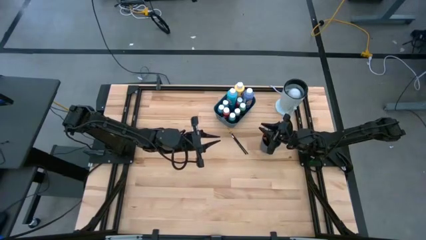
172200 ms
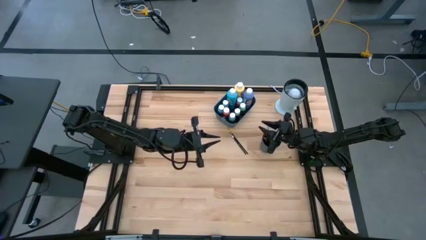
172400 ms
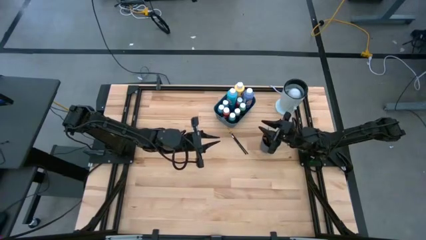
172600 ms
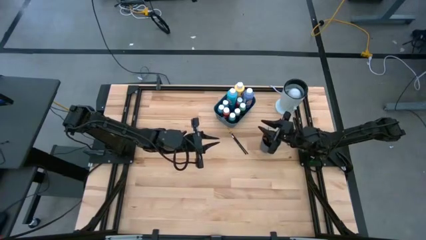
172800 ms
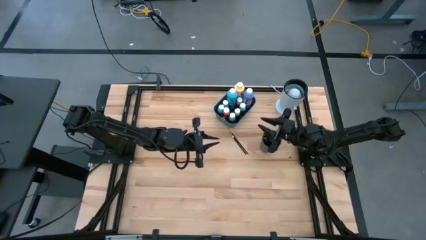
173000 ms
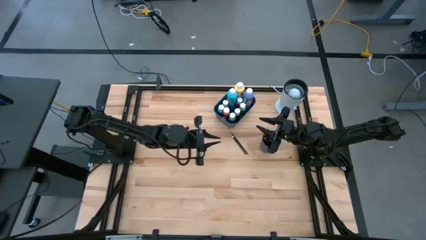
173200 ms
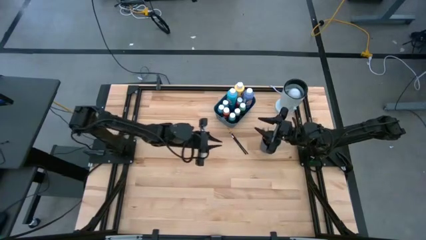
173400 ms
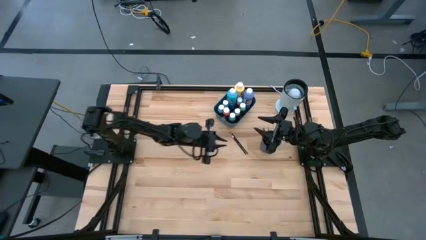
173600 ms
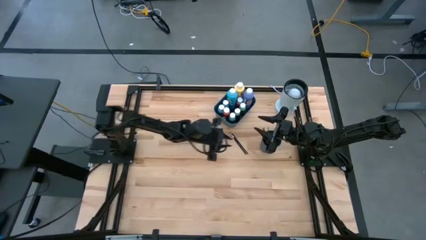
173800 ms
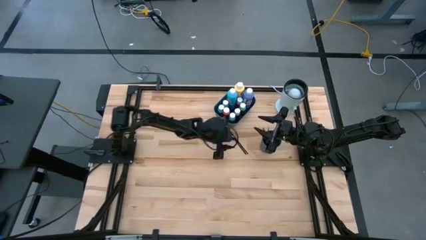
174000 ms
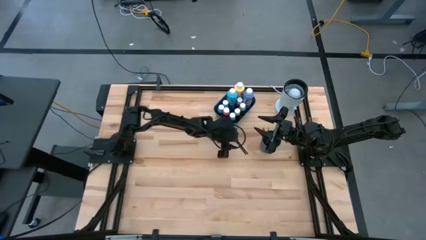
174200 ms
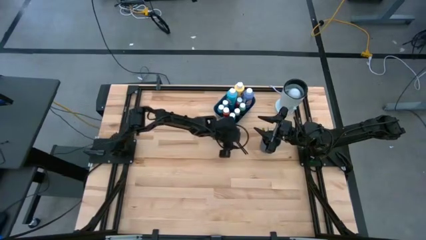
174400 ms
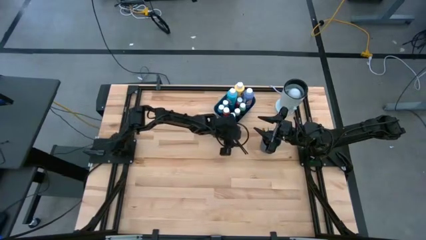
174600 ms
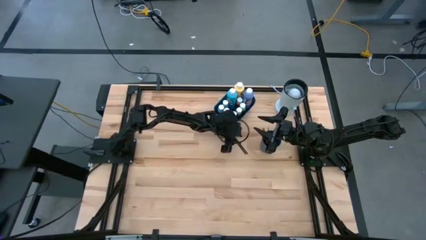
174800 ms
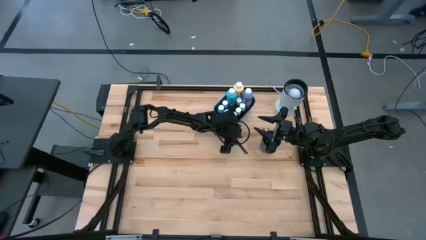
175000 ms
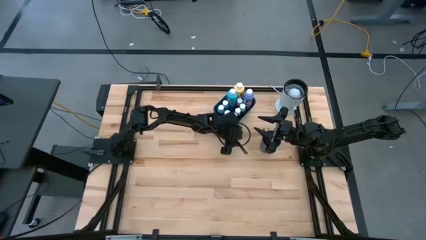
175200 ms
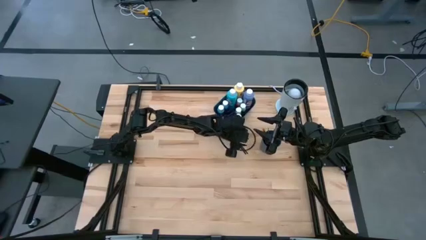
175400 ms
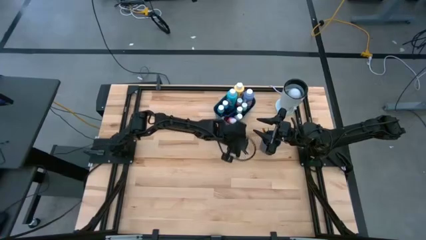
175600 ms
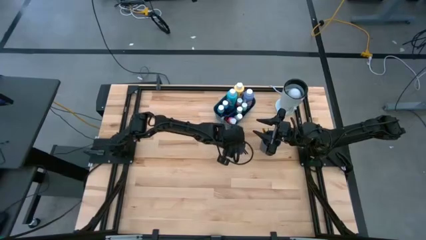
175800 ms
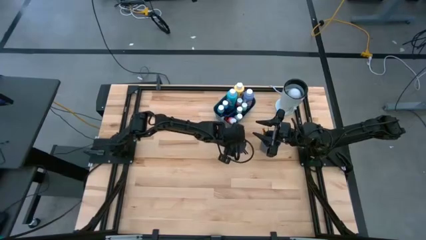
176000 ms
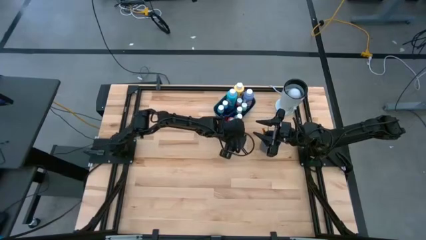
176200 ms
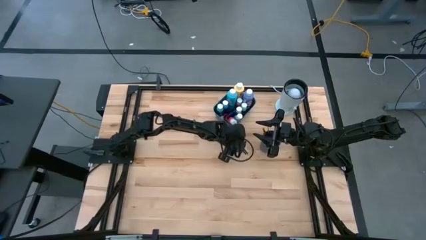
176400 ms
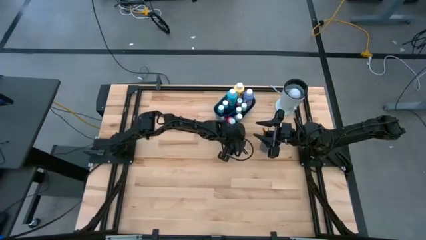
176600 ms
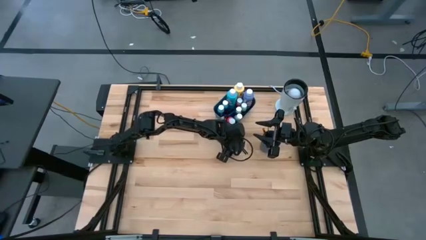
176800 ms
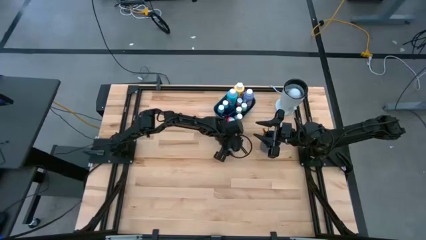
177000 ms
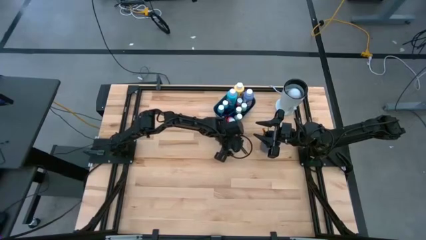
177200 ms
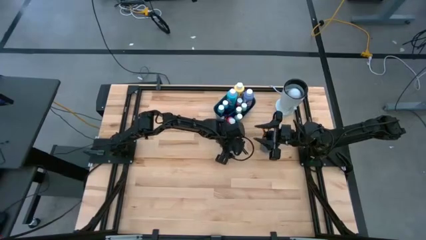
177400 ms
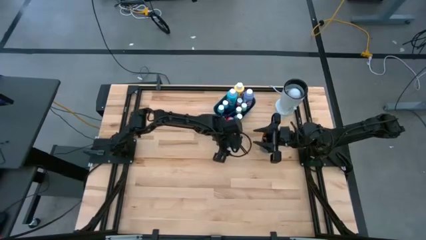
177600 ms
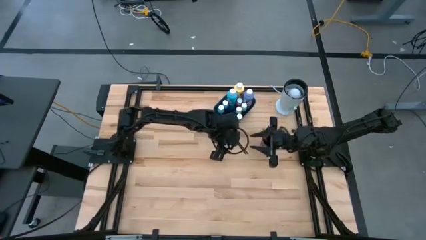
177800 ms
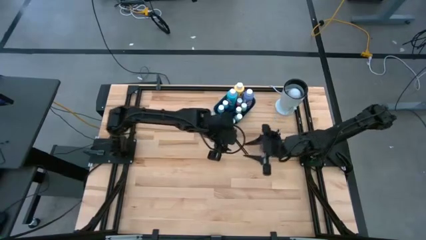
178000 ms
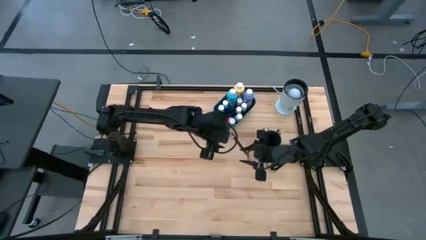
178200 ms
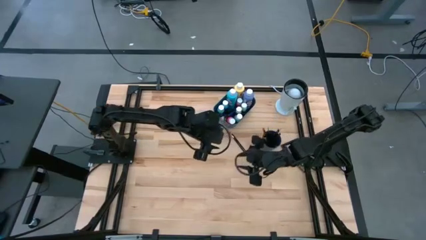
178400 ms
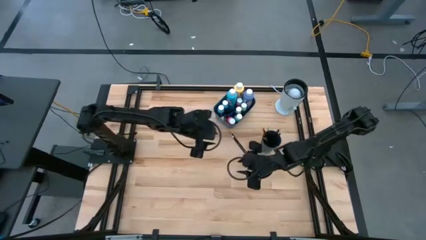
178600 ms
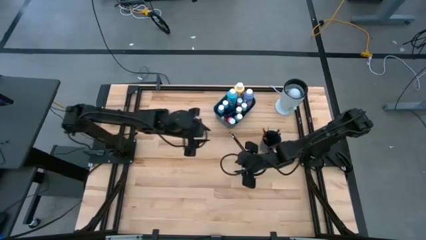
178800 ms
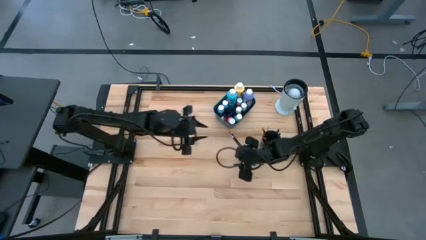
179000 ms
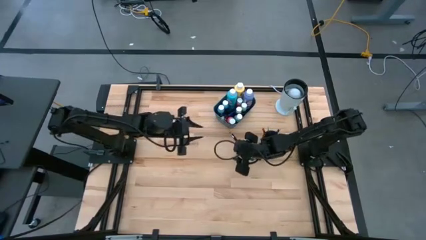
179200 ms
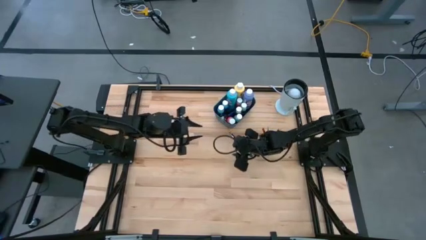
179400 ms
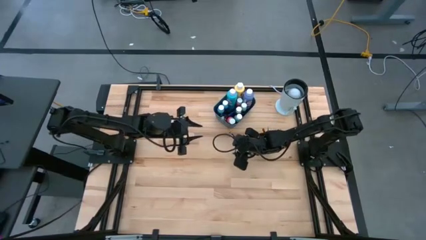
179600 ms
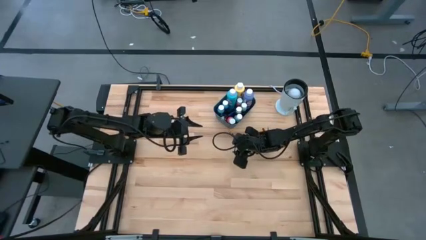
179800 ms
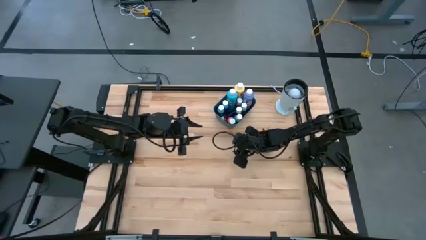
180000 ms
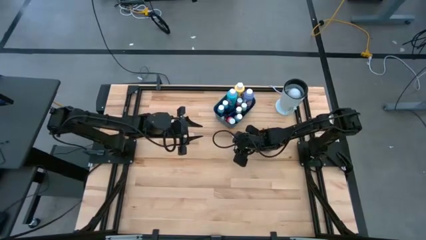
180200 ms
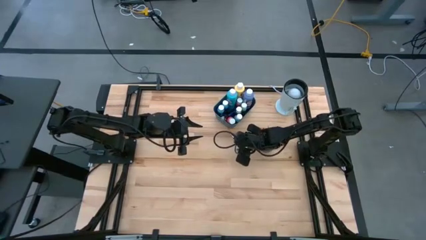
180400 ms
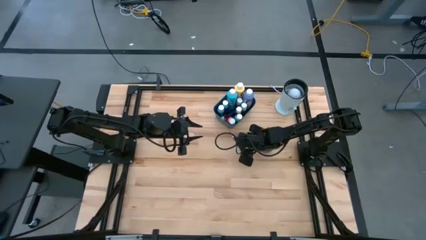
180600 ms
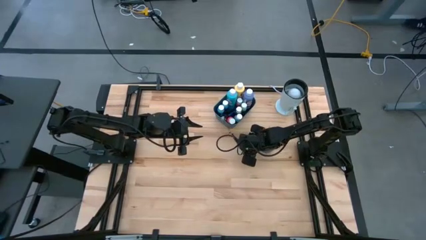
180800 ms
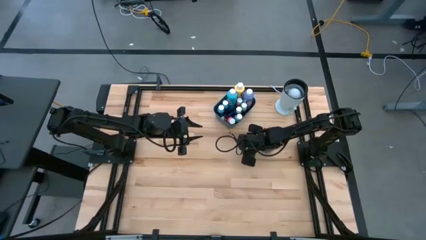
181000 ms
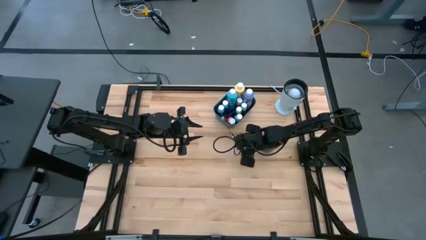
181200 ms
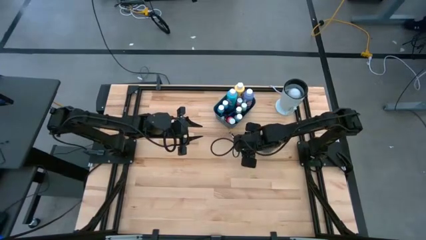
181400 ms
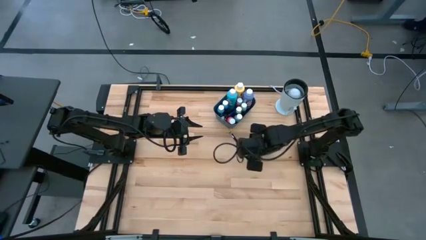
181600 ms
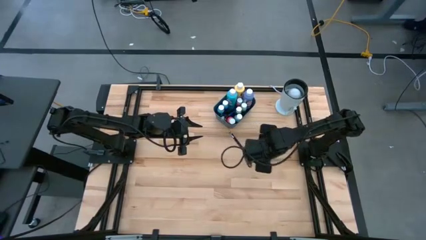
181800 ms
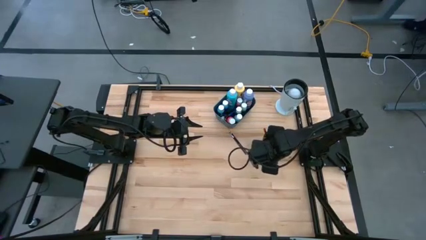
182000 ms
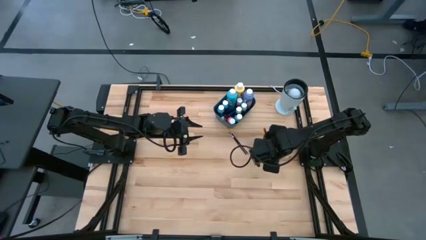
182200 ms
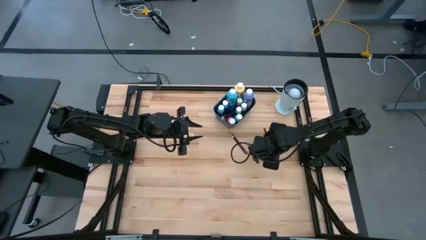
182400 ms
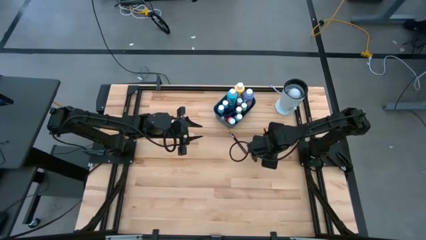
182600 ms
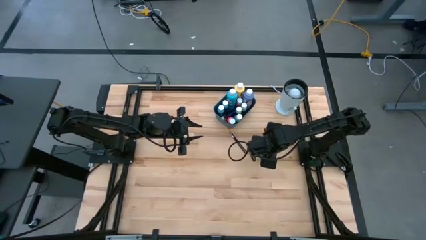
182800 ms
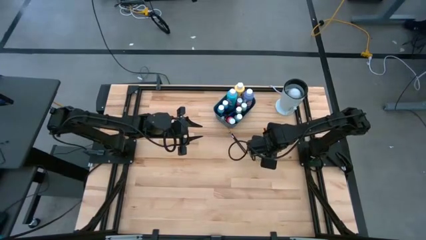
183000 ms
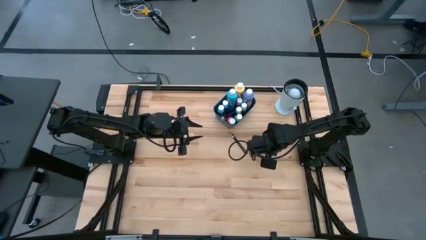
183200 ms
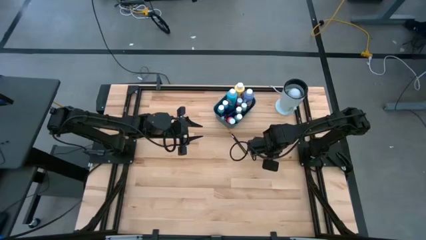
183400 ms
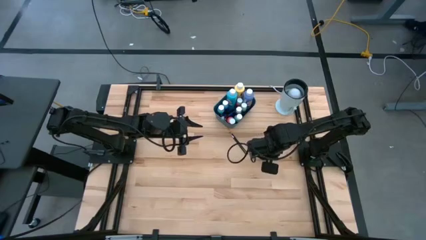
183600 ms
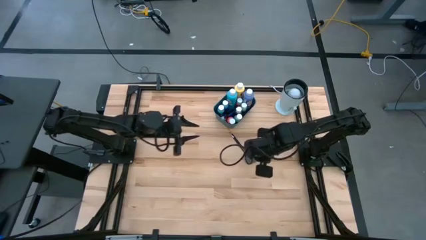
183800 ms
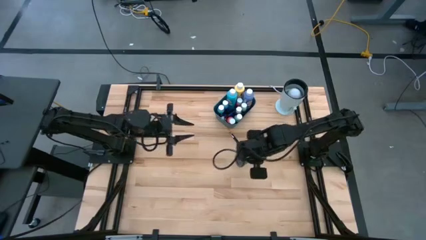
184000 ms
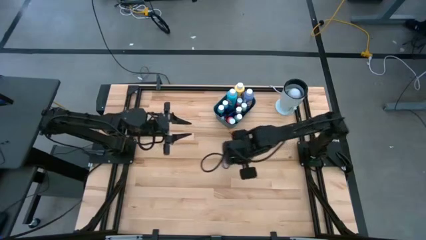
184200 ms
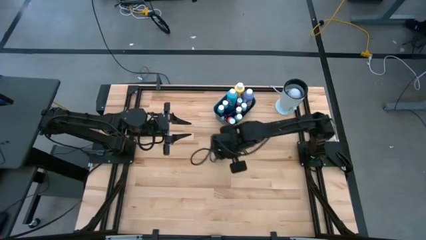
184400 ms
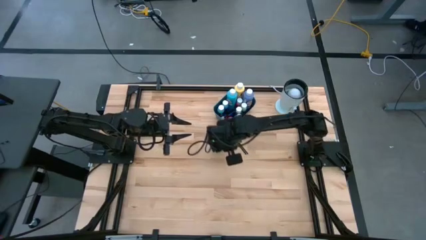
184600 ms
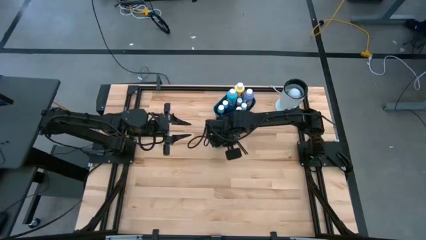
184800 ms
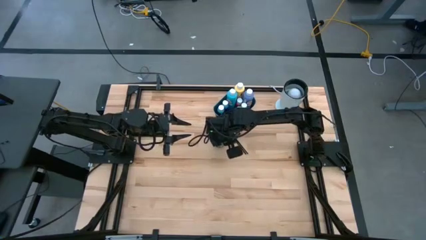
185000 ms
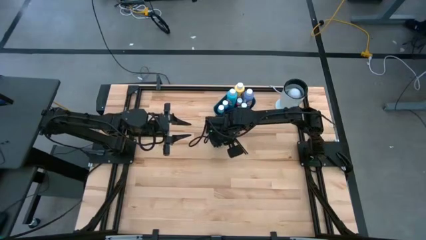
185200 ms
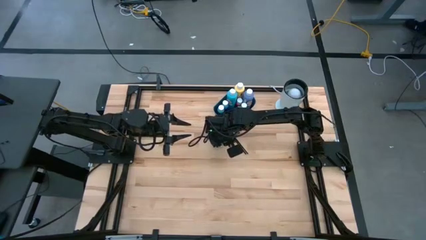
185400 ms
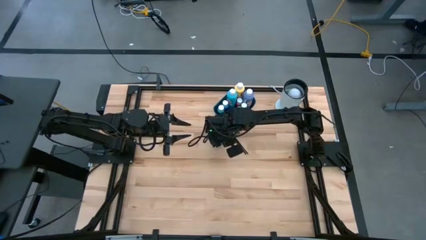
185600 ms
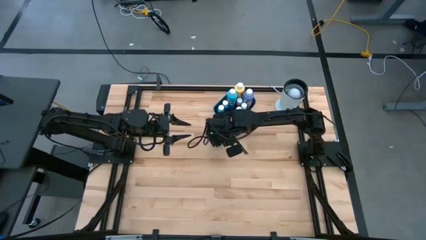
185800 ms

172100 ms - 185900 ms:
Task: Pick & Place Paint Supplies
Move the blue cup to the center of the table

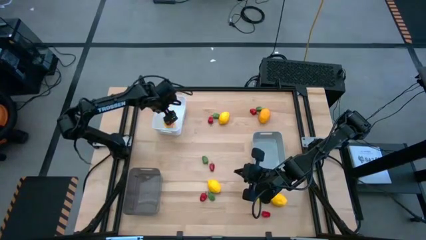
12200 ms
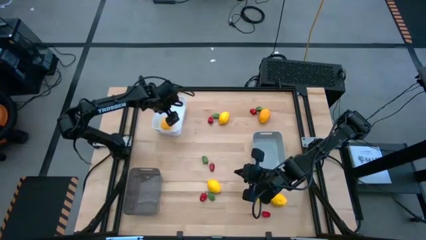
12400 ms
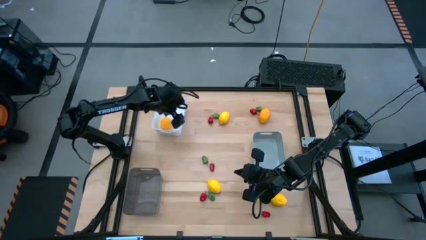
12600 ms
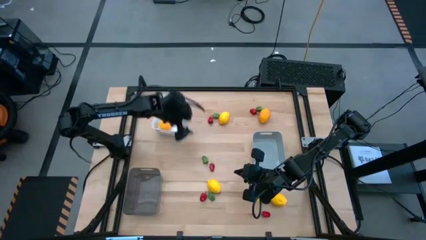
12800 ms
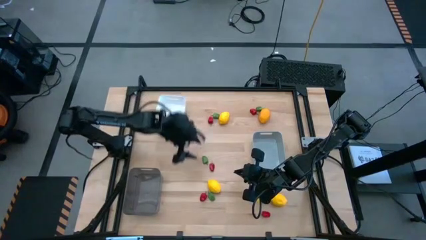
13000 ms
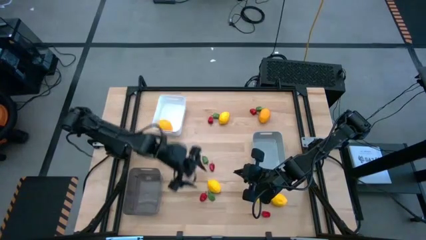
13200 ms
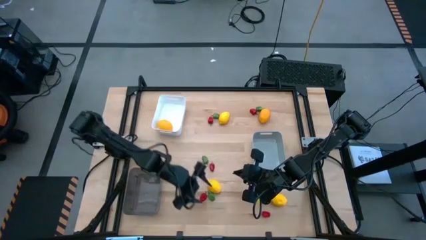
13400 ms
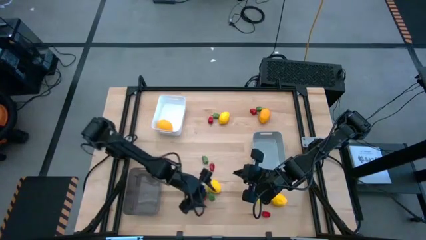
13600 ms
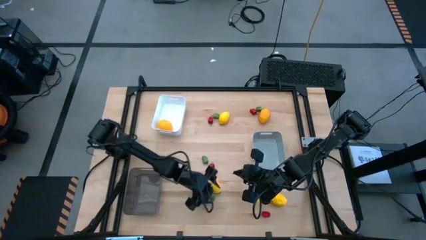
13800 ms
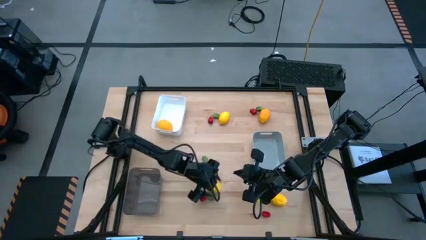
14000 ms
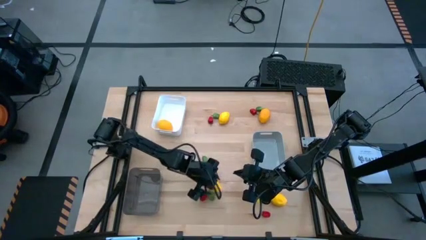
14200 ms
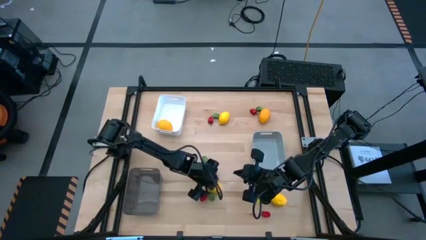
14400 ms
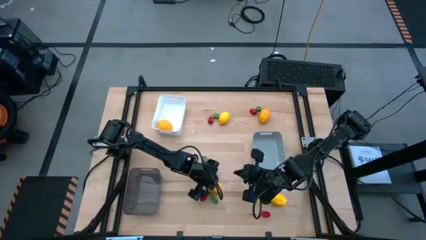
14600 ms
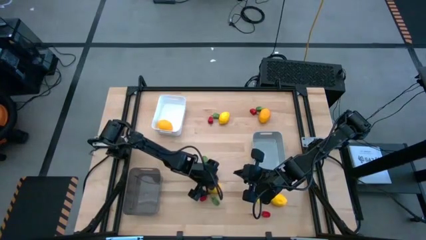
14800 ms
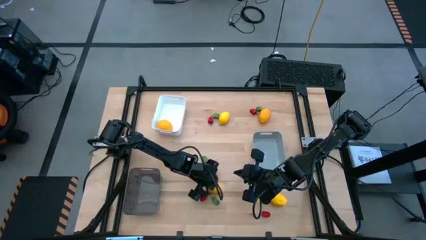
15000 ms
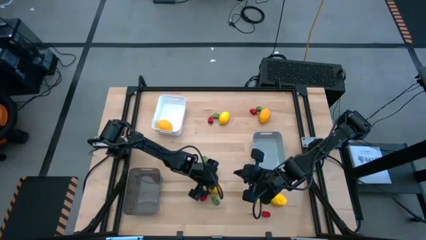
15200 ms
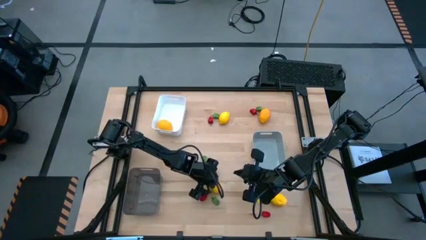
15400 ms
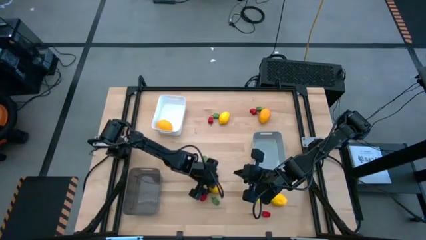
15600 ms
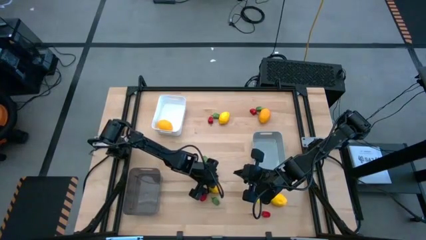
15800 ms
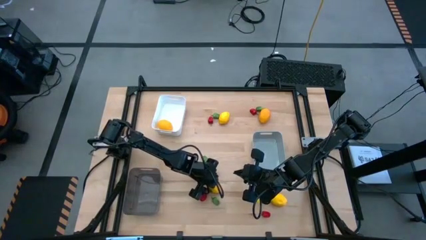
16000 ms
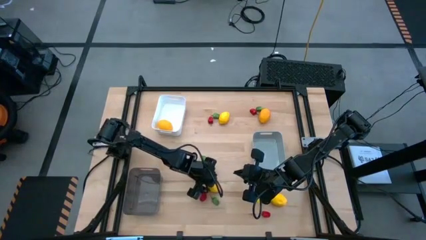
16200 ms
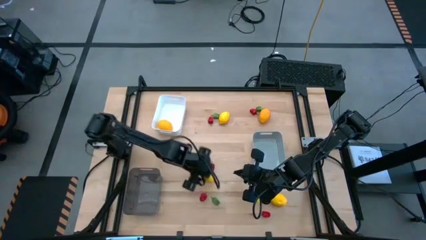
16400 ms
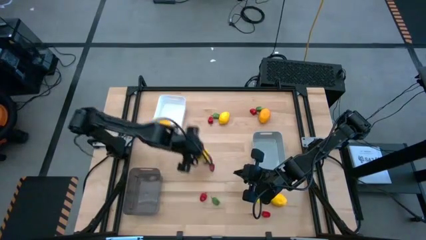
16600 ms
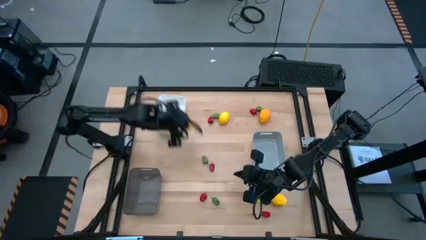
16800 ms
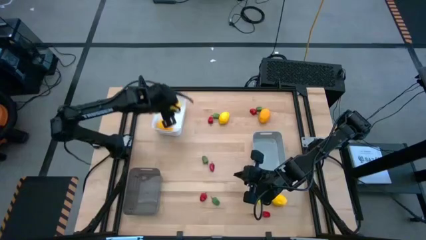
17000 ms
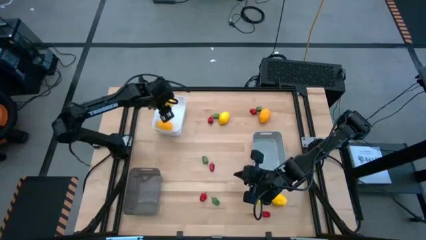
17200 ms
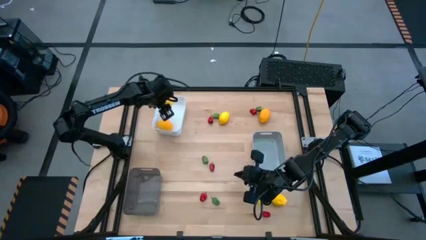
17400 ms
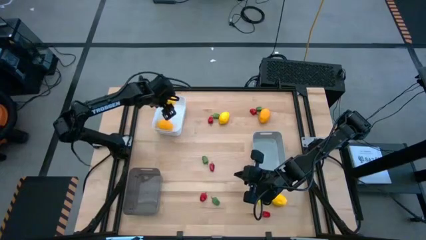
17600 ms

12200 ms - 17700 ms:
Task: Sort produce into baskets
Put the bottom left yellow lemon into the white bin
